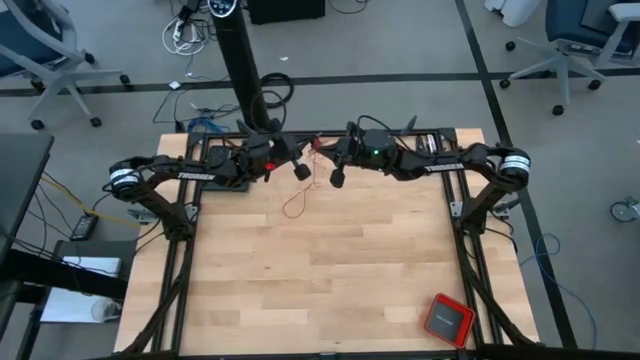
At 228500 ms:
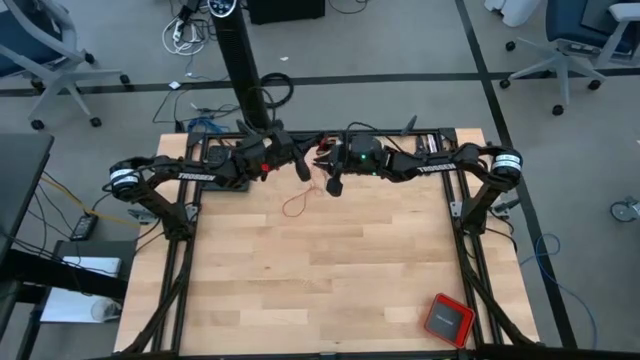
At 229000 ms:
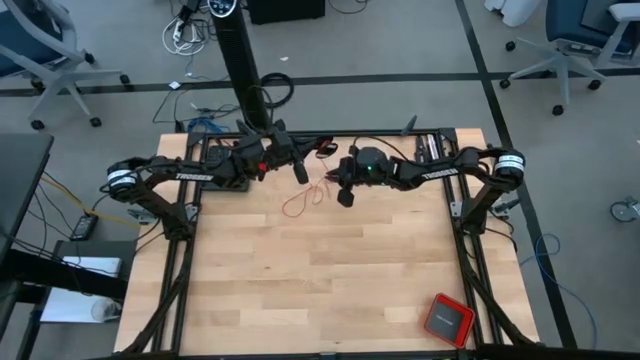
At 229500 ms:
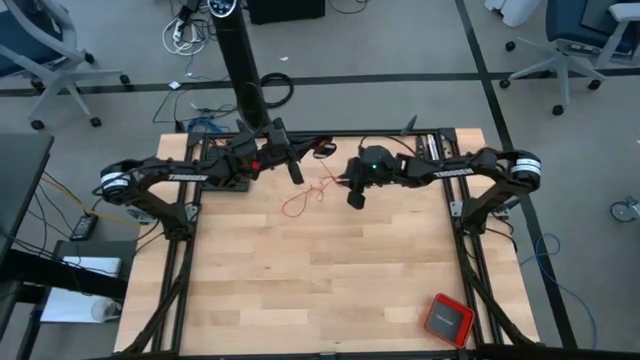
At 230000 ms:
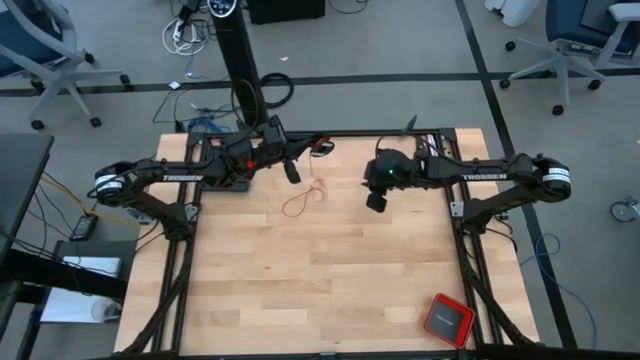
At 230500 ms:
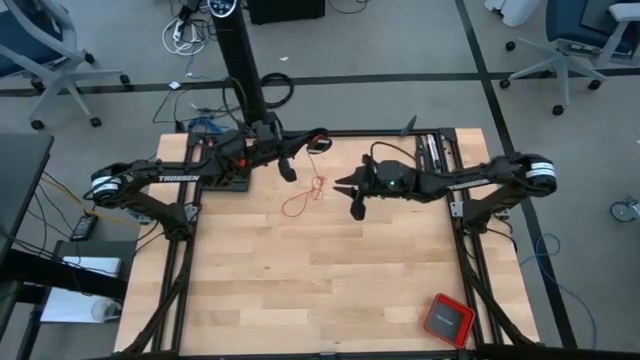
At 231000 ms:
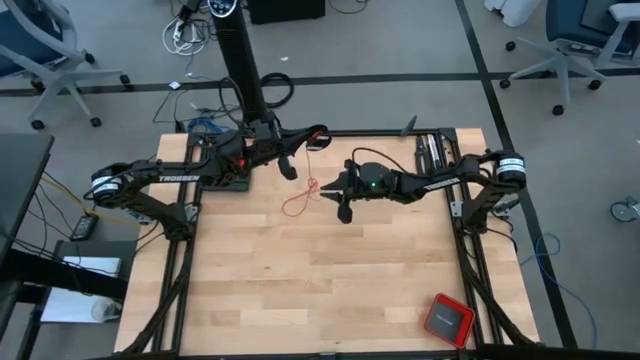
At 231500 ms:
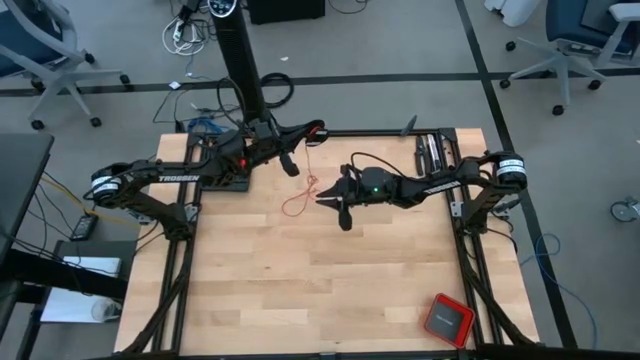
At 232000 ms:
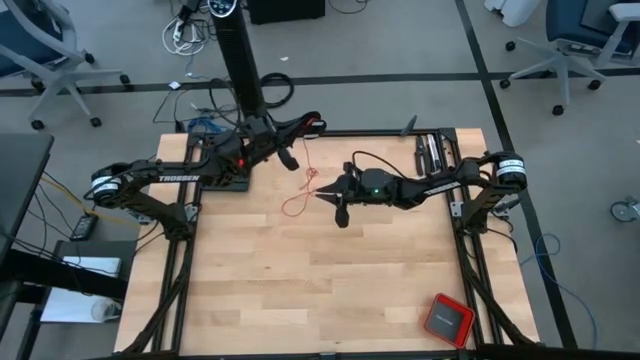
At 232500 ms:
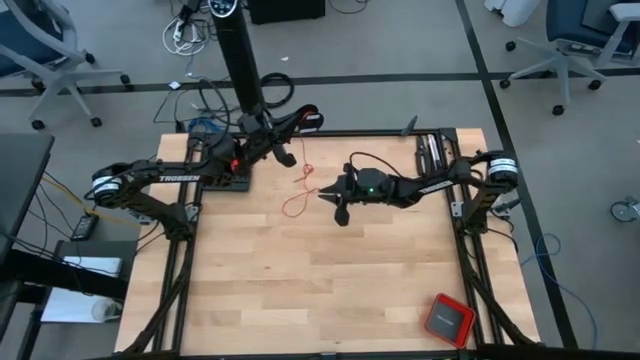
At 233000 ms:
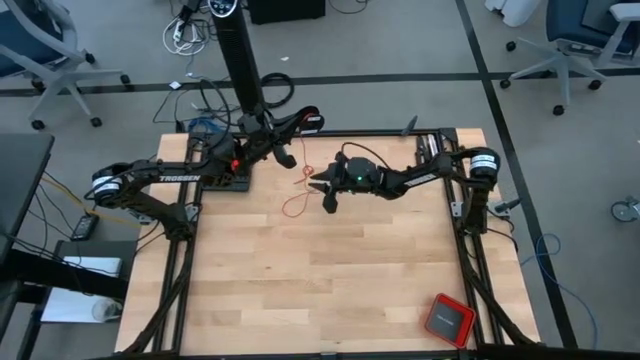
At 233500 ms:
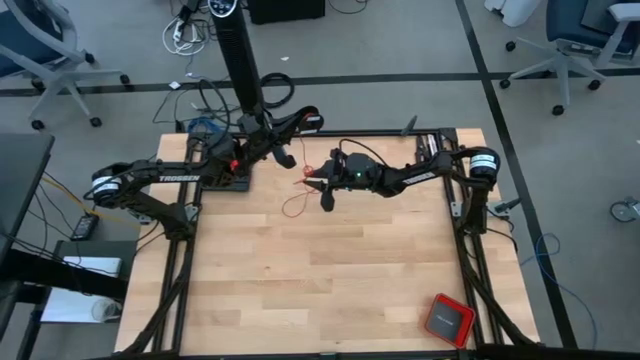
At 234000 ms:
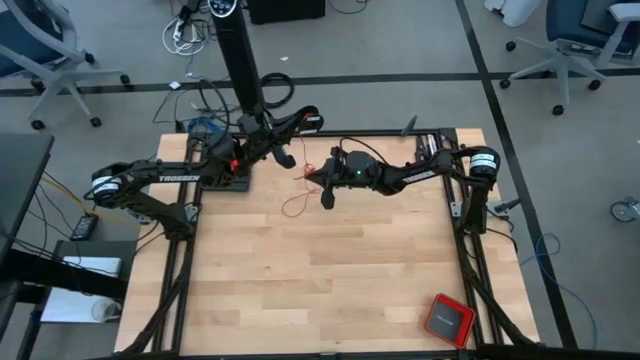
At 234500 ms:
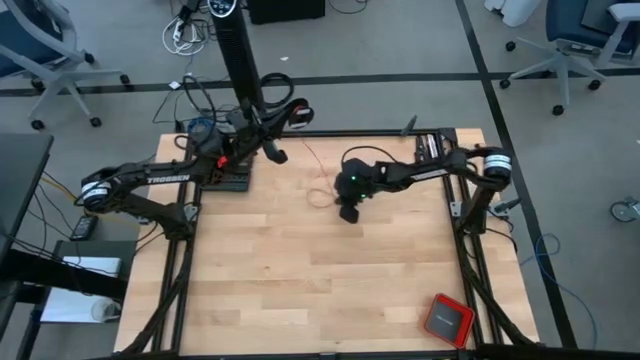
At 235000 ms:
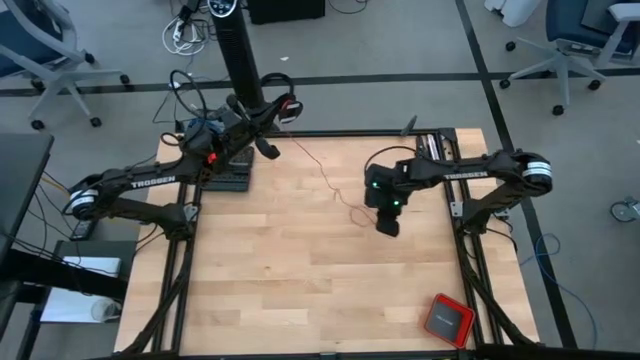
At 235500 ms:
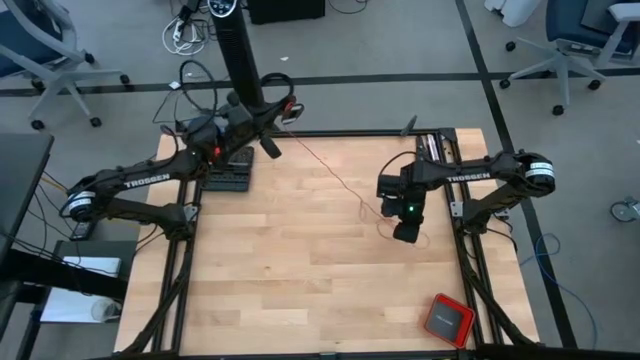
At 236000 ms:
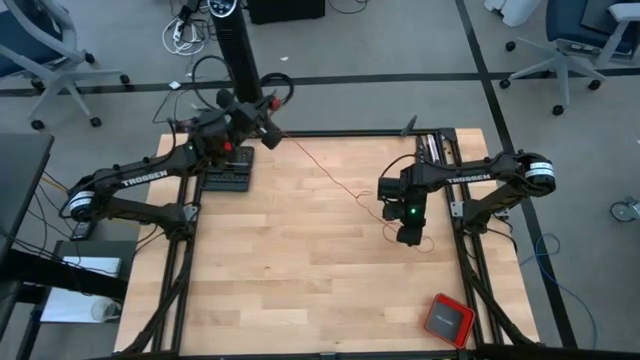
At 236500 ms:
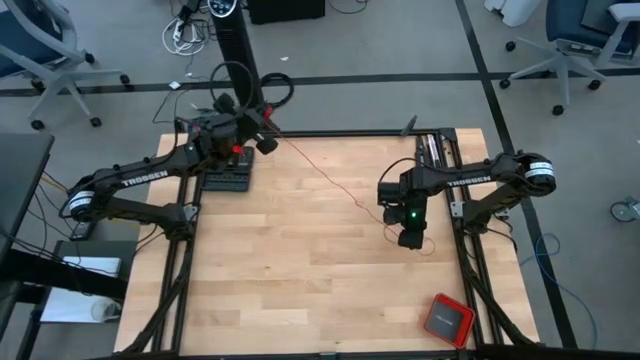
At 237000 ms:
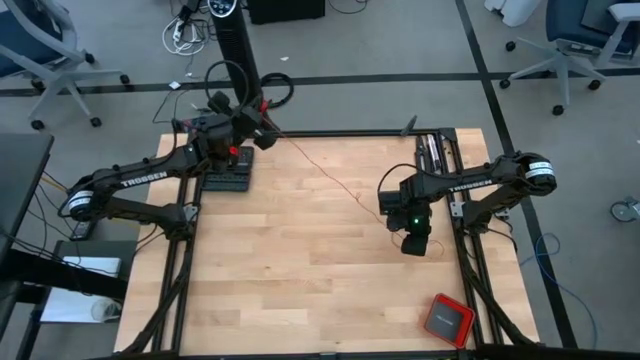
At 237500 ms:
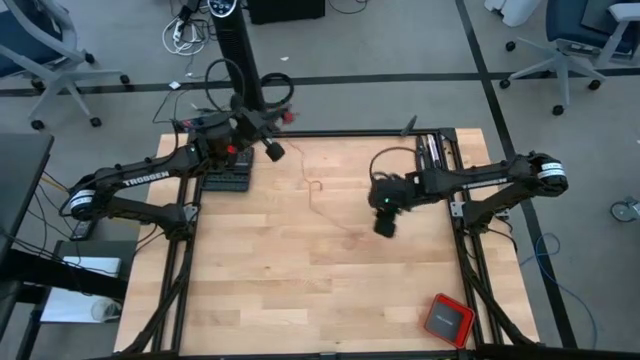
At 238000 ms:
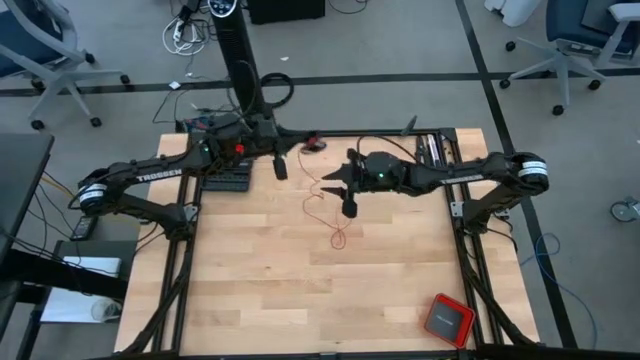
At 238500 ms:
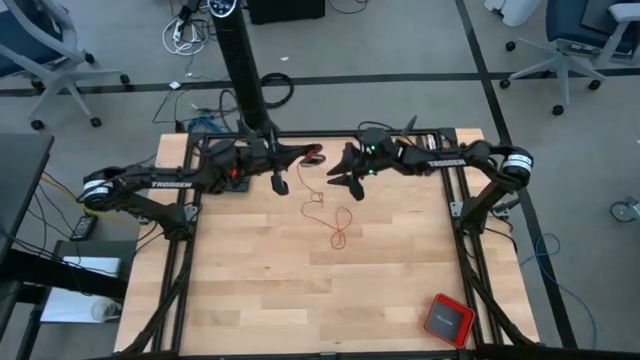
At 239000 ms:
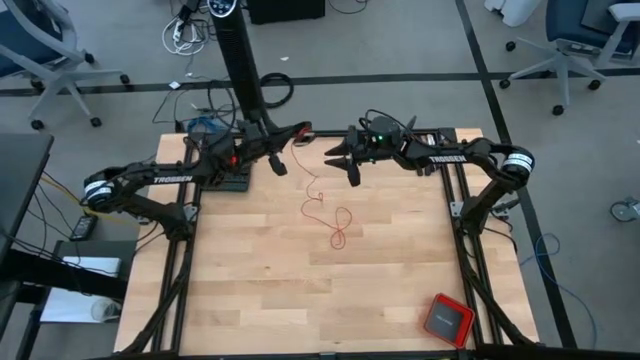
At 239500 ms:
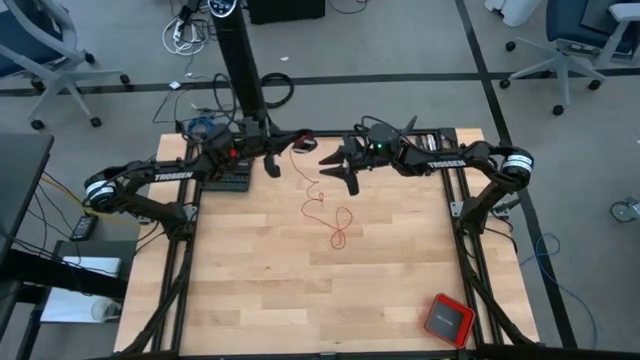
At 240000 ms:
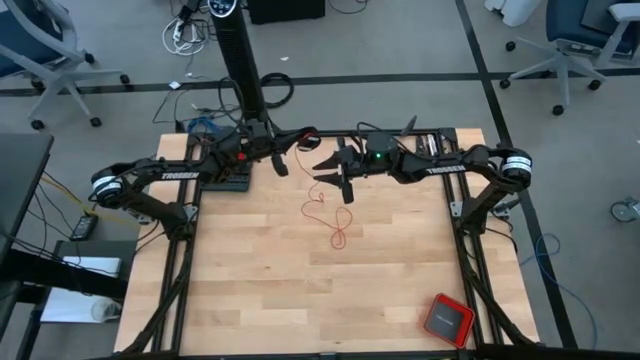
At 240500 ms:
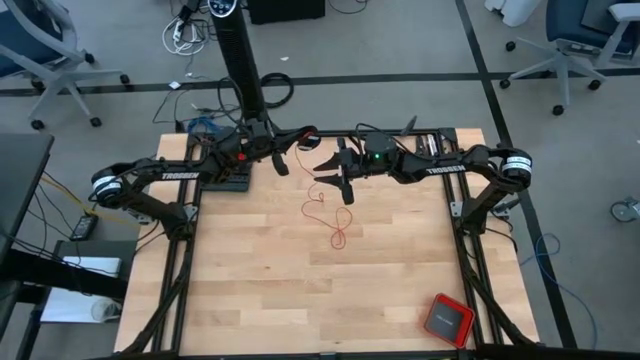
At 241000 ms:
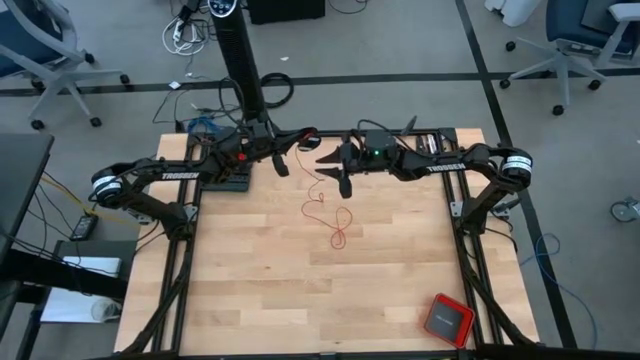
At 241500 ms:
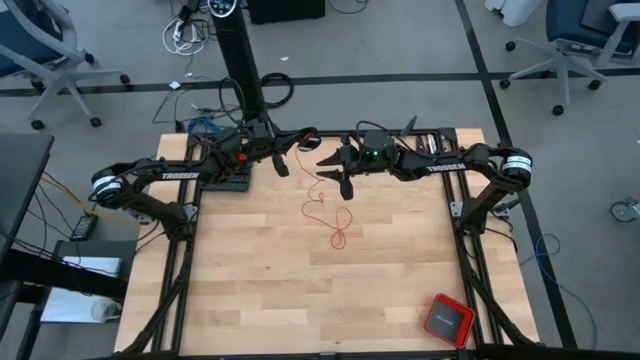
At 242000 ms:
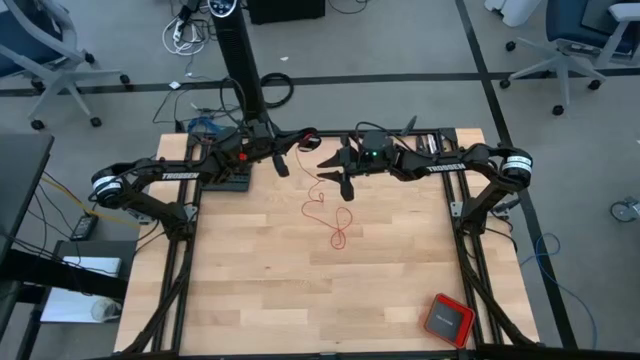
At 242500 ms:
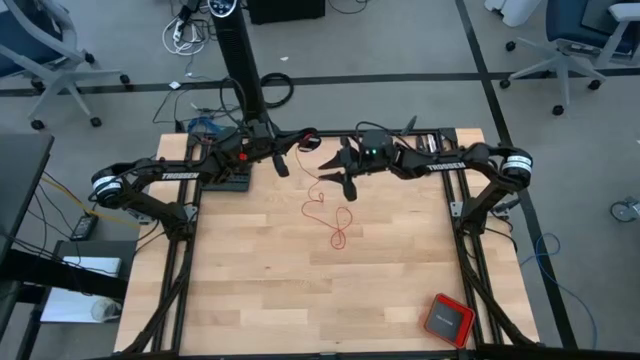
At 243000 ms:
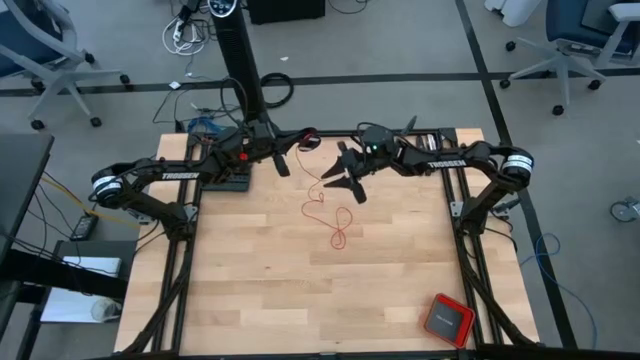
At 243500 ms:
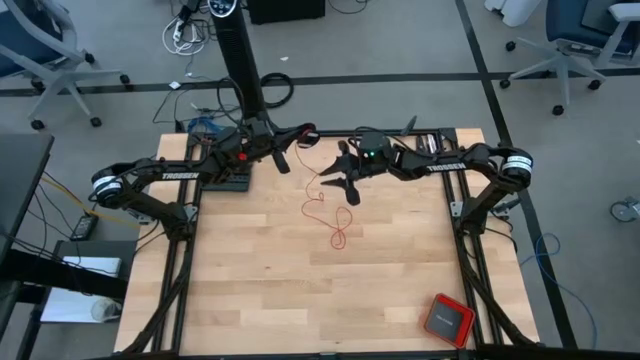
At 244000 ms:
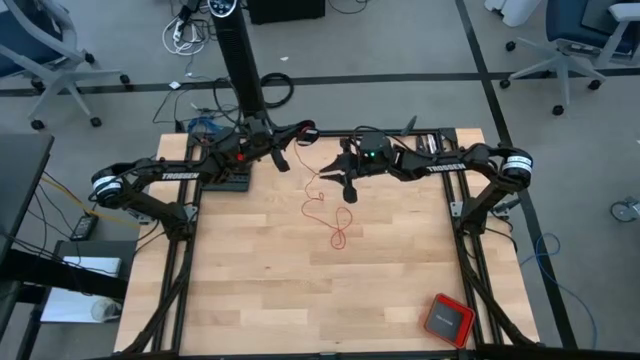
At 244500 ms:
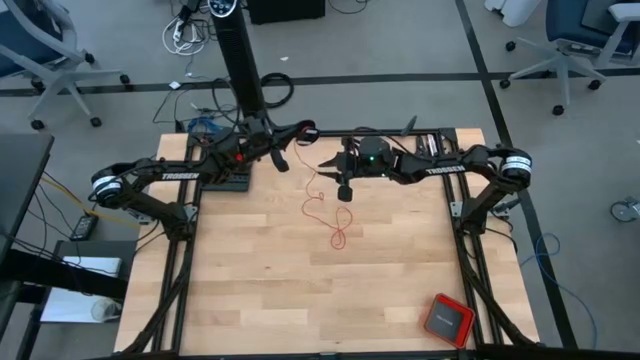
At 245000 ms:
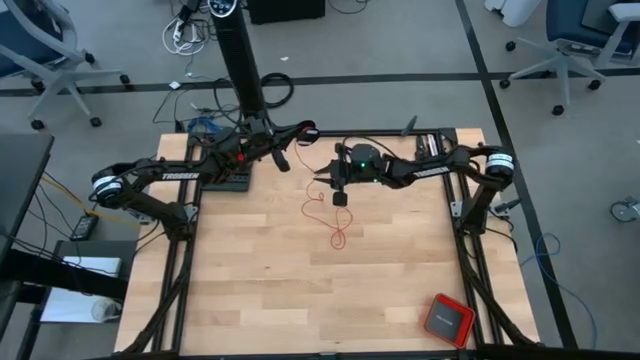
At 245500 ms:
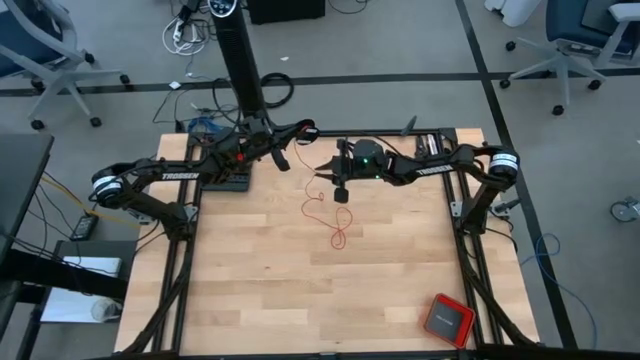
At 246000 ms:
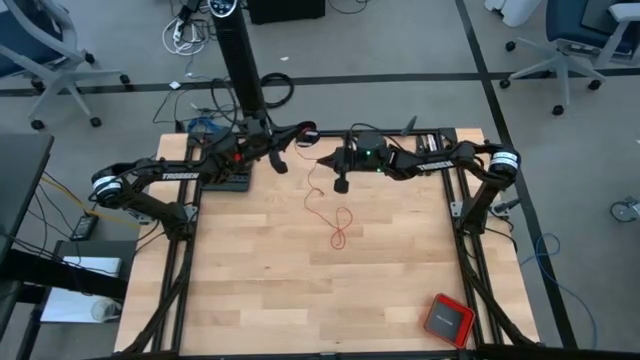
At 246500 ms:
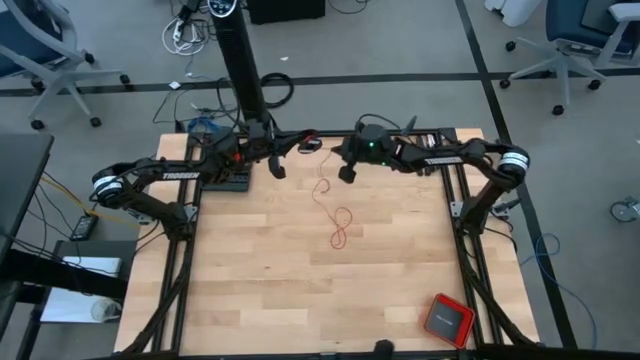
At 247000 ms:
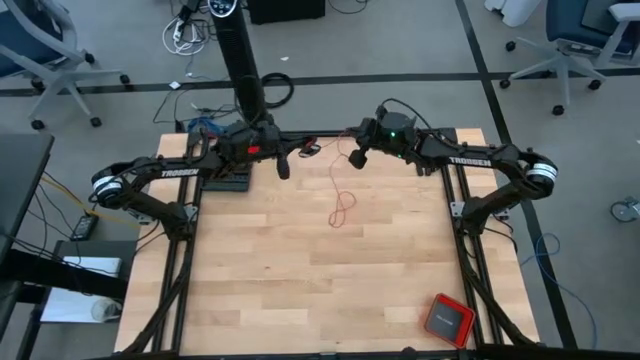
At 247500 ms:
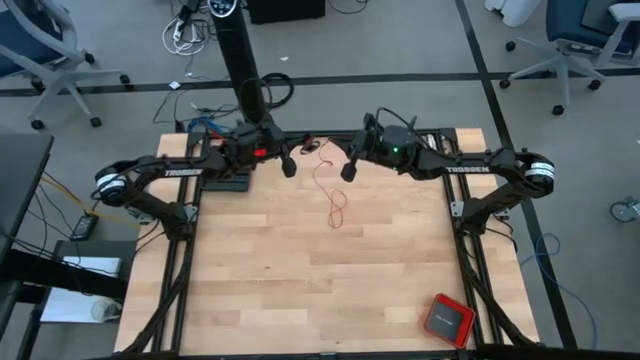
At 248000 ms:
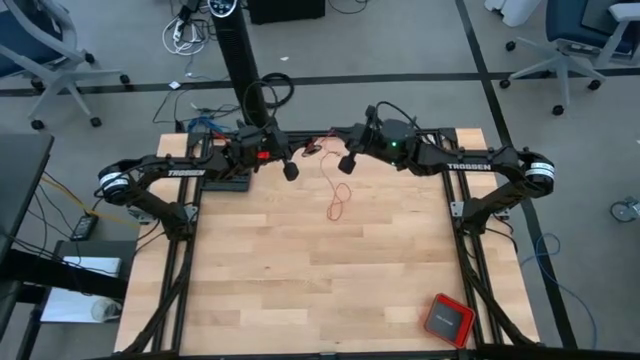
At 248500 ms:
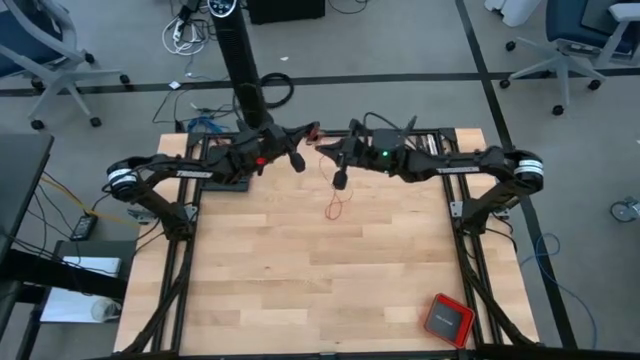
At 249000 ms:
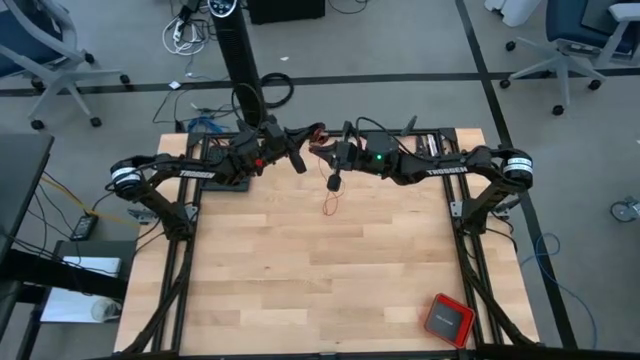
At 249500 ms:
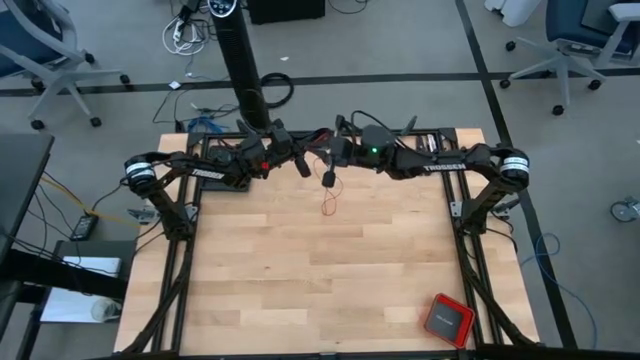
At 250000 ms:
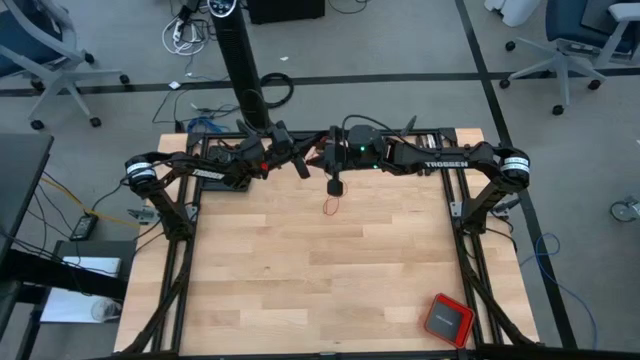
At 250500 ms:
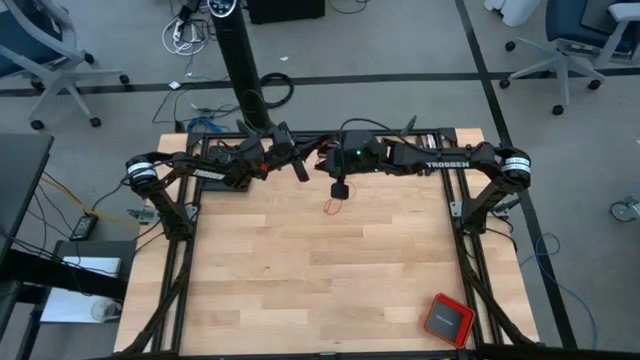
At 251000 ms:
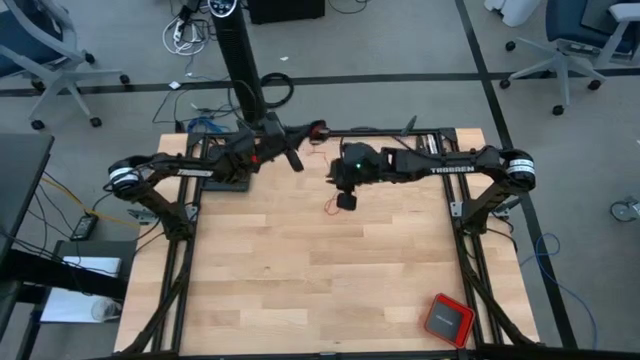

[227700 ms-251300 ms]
Task: Coil cords
Coil the red wire onto the spool
